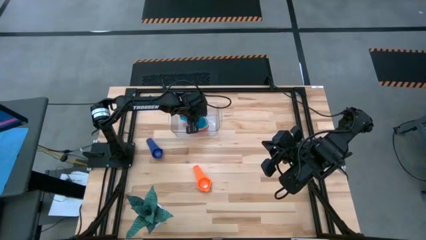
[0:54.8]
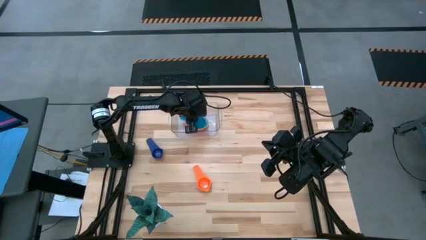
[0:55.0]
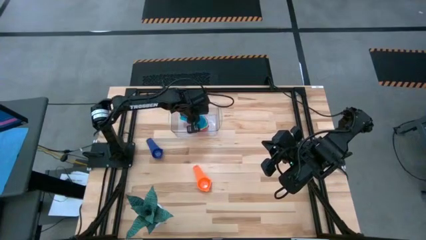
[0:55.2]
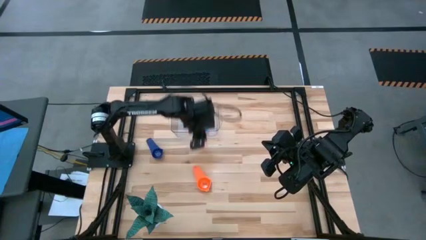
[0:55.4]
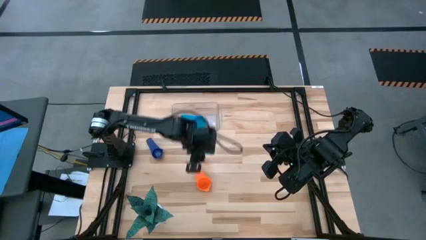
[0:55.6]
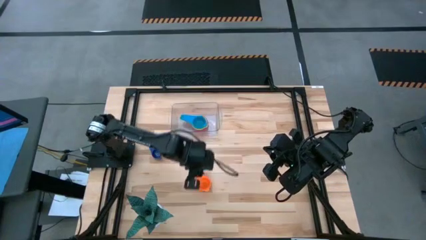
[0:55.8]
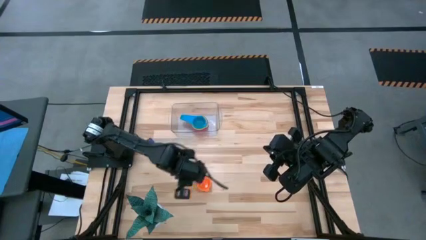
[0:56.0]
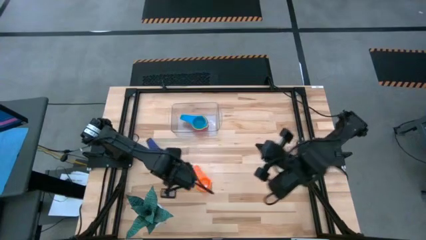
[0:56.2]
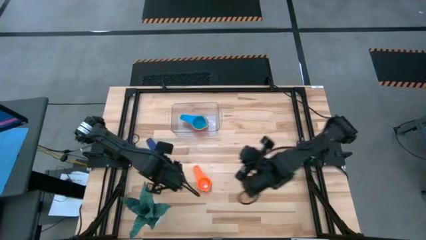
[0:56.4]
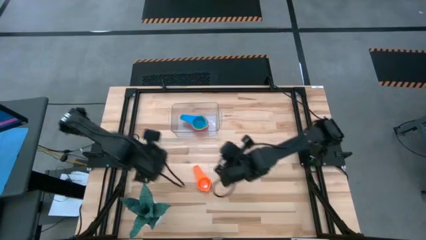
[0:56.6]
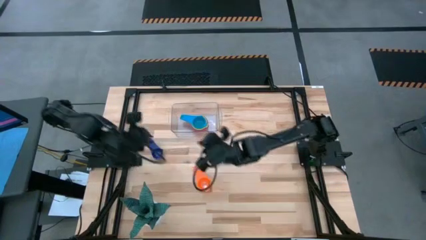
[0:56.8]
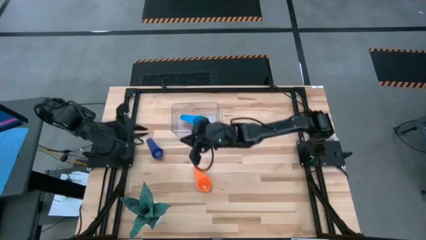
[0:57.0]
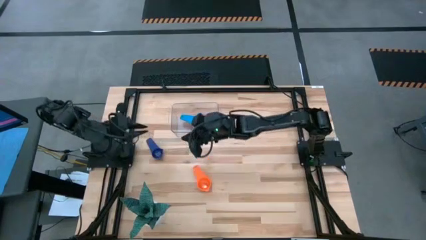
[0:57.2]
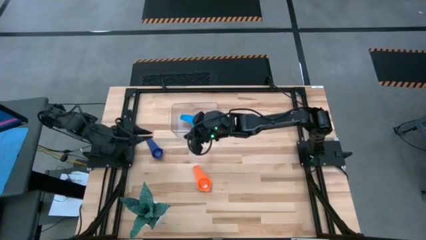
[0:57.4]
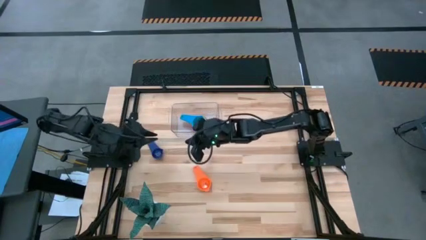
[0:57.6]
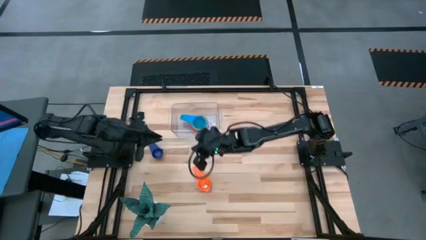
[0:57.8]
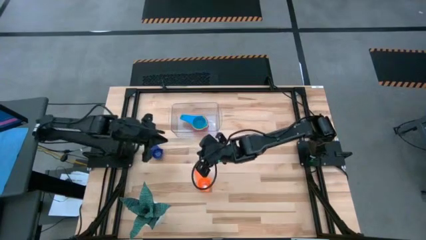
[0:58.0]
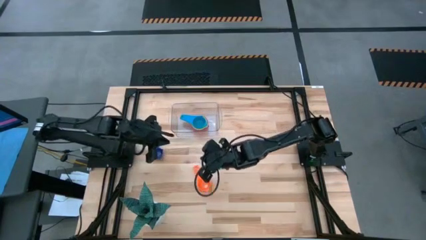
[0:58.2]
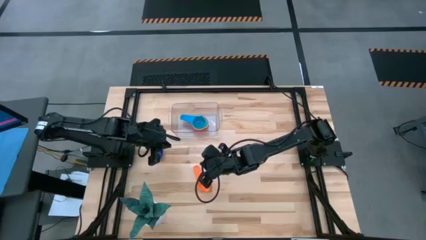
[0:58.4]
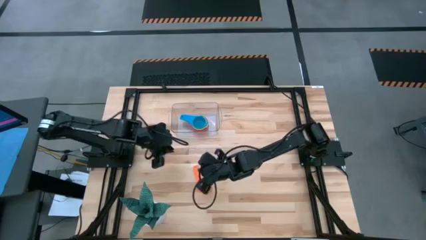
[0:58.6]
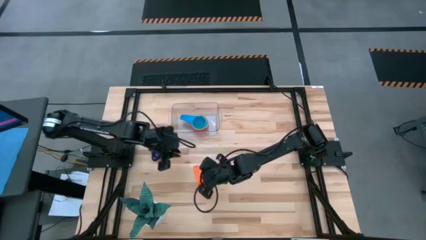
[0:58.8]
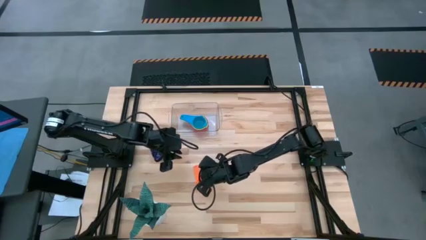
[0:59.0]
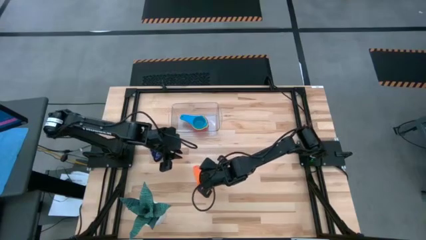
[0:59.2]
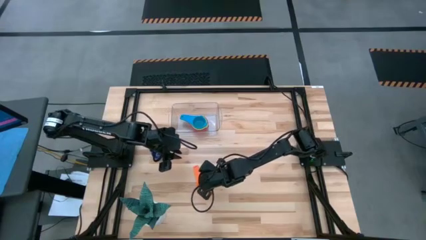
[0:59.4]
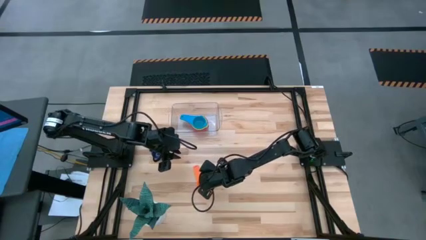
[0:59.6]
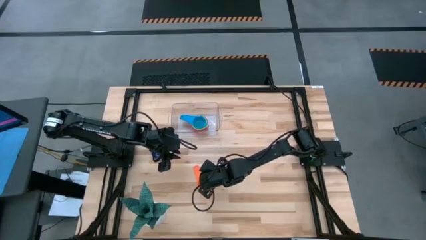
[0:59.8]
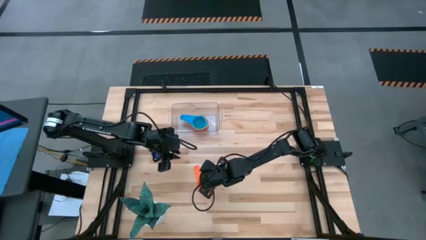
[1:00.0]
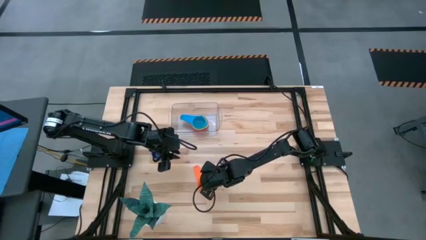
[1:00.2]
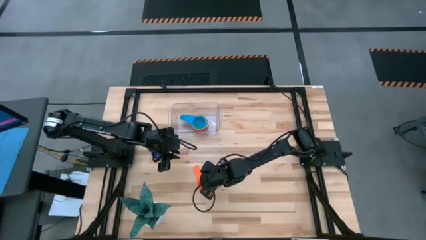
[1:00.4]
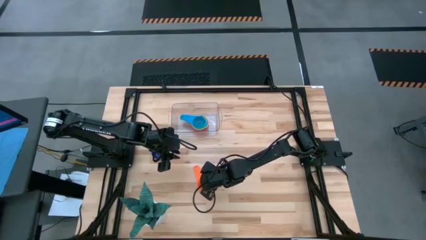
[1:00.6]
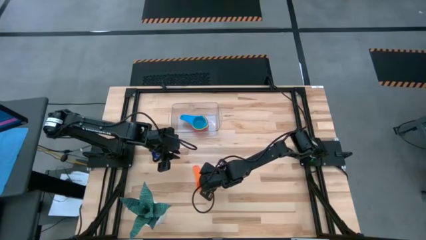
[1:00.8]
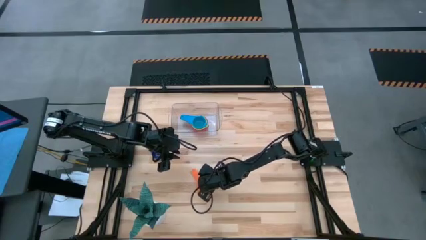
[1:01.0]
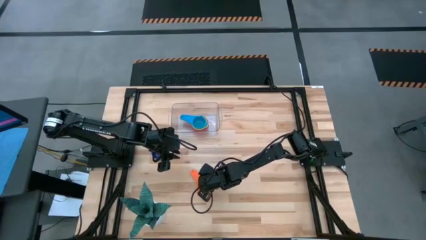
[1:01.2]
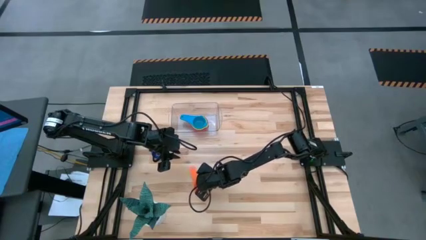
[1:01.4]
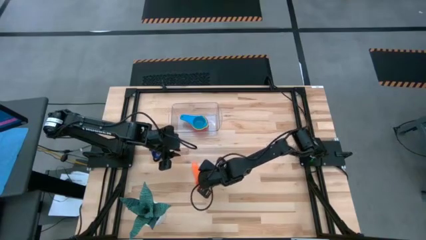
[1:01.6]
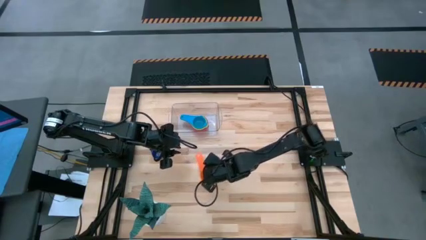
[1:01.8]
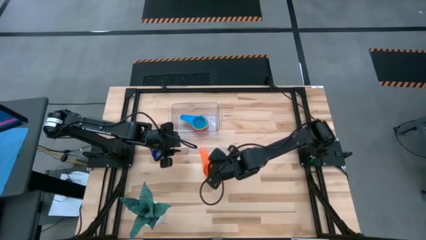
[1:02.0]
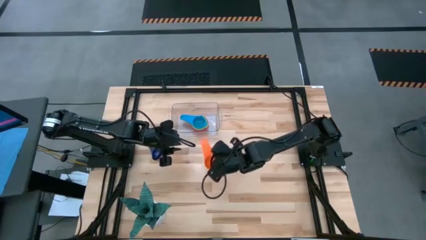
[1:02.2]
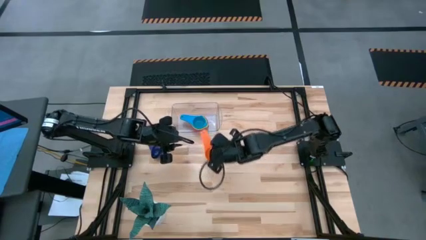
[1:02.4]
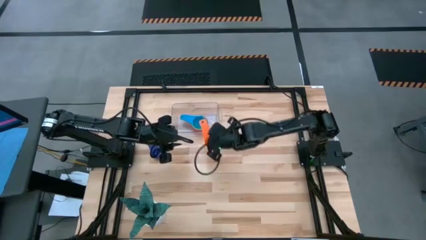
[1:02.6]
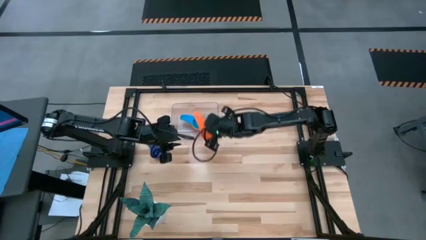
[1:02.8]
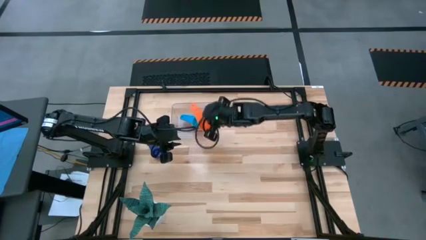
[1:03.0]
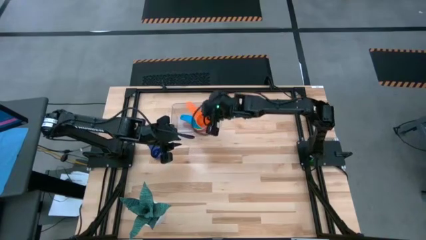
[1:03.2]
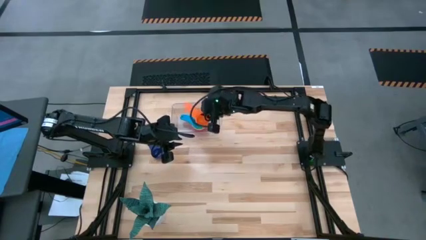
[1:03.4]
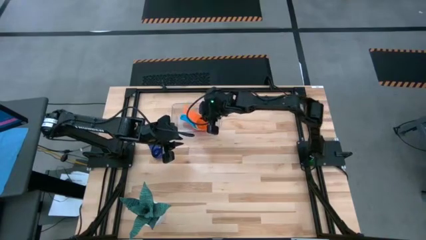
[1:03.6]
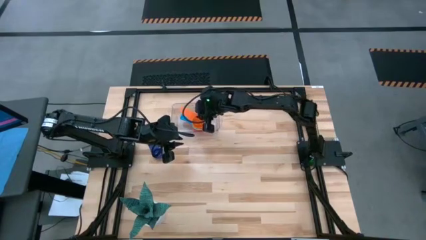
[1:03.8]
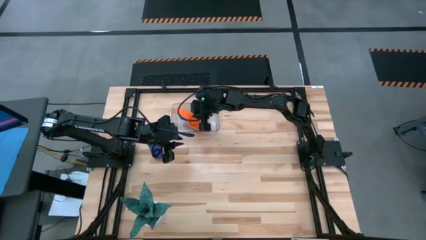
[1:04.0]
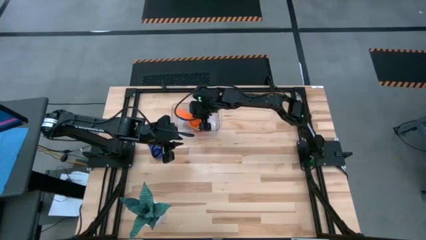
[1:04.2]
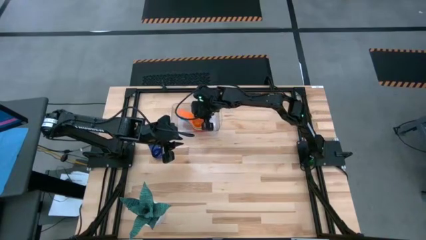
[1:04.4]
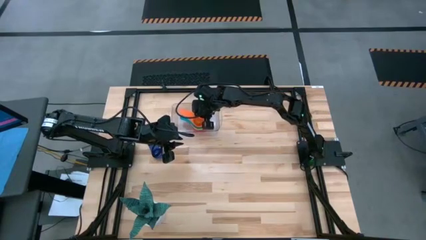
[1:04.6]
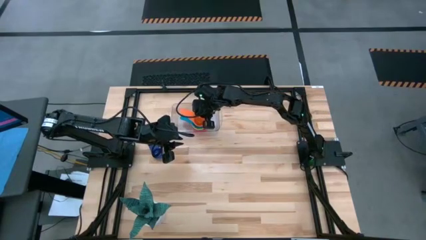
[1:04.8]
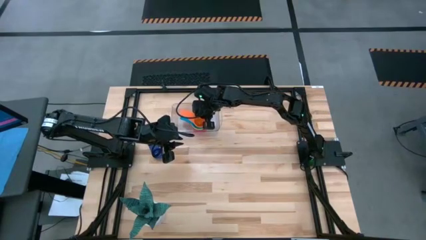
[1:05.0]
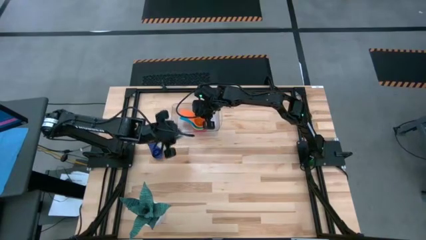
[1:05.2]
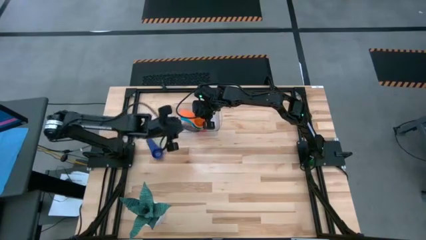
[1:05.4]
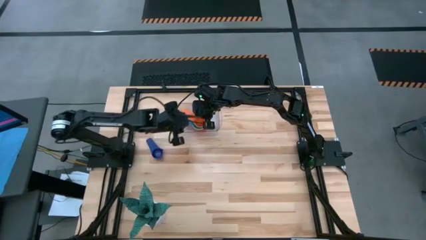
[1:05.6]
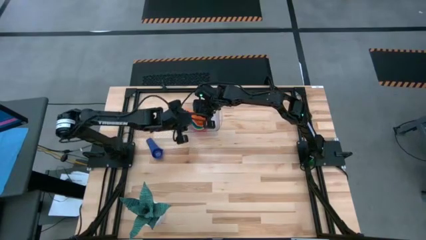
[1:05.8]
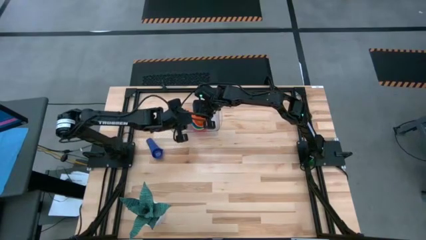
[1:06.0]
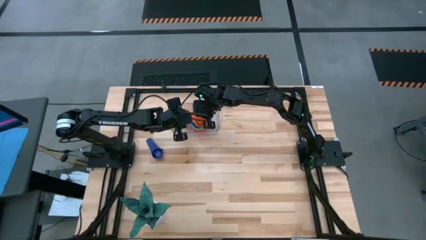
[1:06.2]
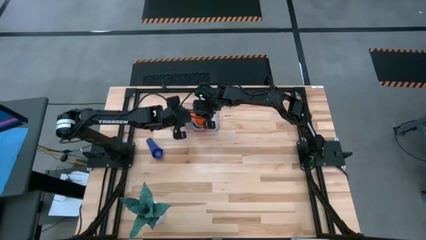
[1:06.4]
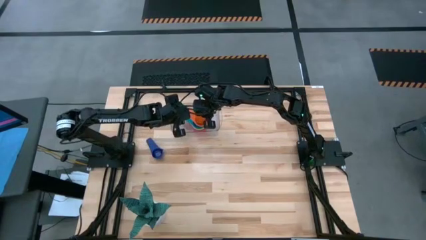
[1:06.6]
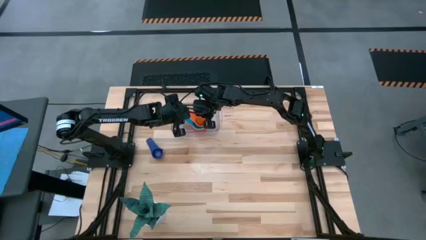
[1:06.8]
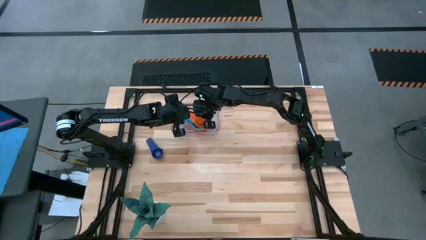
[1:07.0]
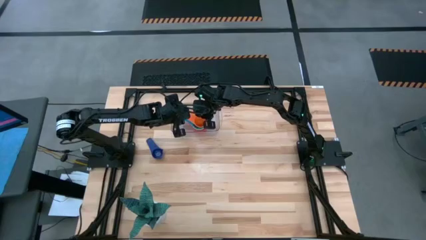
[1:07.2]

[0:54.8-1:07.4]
Task: Nest measuring cups in basket
Stack the orange measuring cup on top of the light blue measuring cup into the transparent bin

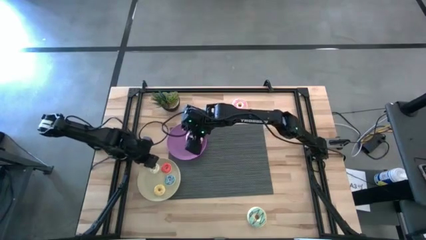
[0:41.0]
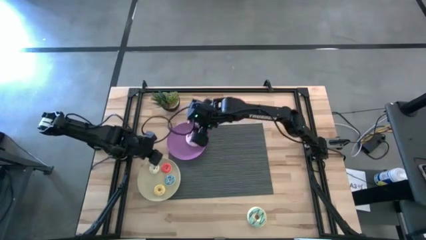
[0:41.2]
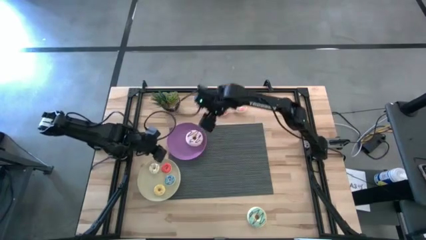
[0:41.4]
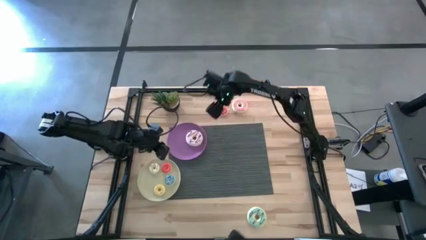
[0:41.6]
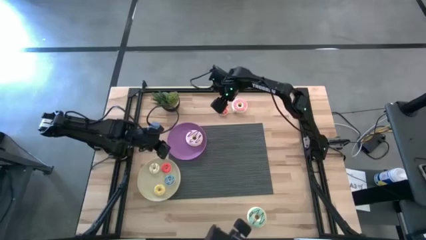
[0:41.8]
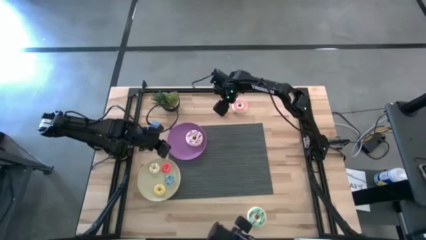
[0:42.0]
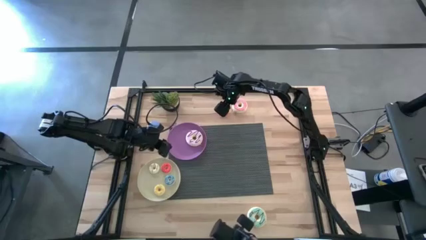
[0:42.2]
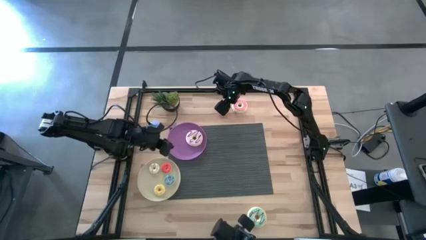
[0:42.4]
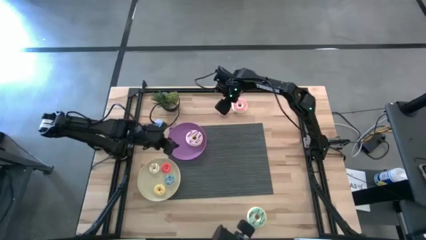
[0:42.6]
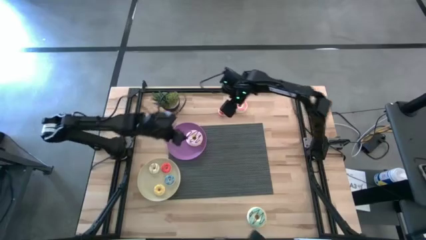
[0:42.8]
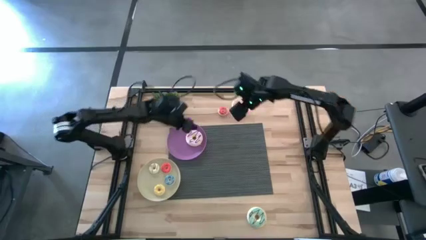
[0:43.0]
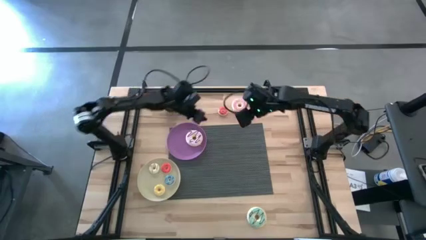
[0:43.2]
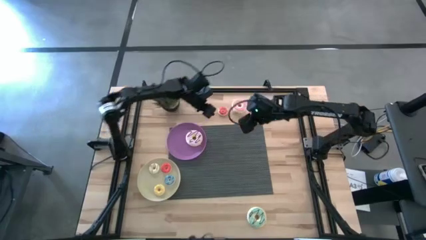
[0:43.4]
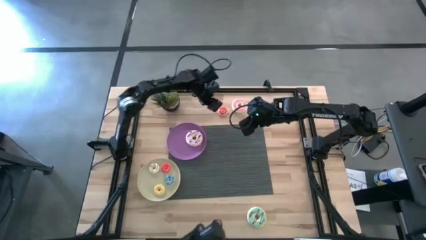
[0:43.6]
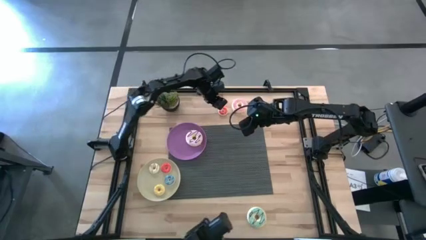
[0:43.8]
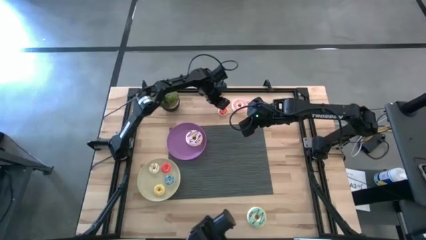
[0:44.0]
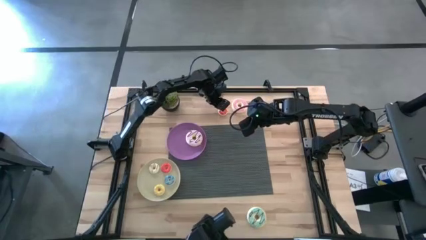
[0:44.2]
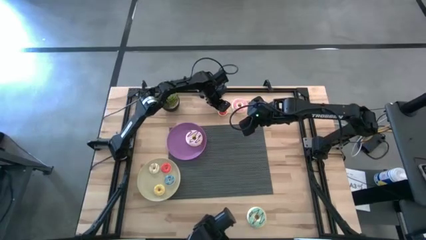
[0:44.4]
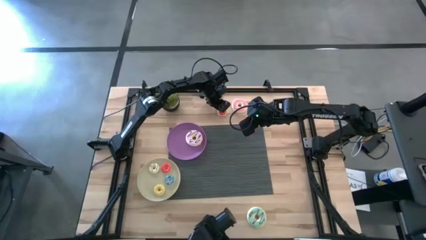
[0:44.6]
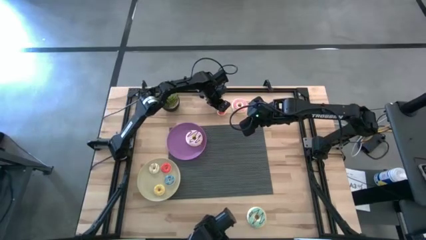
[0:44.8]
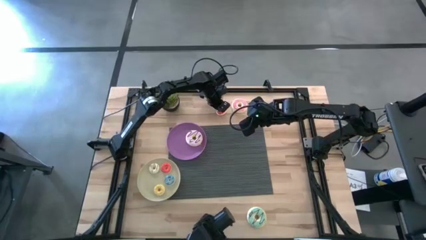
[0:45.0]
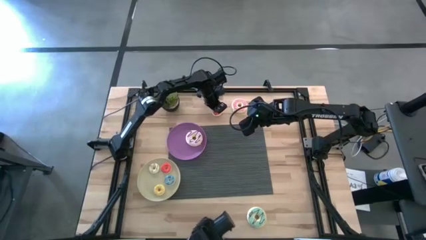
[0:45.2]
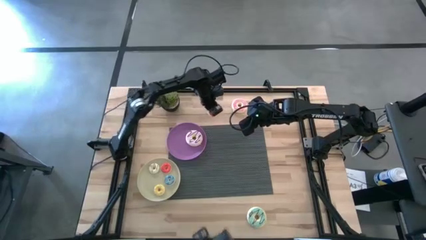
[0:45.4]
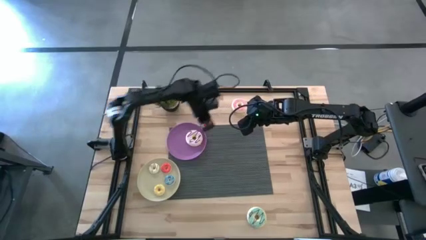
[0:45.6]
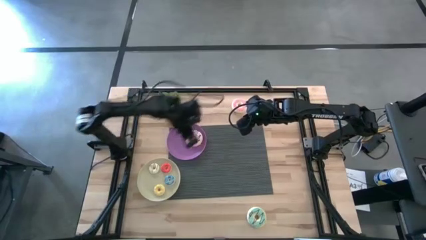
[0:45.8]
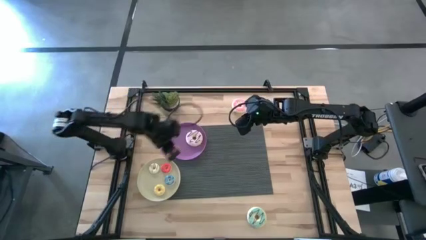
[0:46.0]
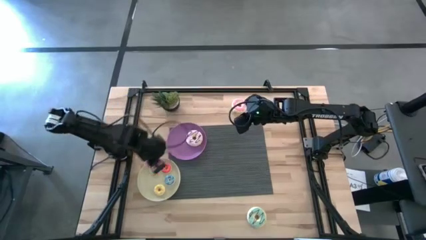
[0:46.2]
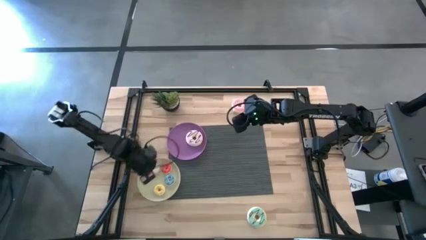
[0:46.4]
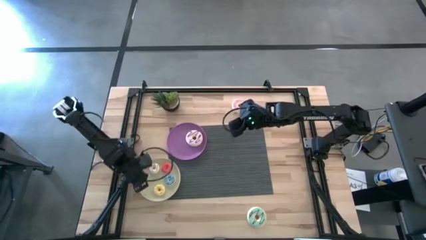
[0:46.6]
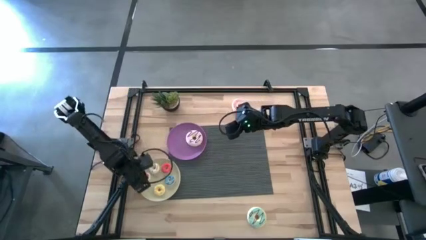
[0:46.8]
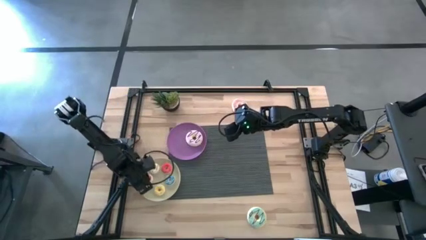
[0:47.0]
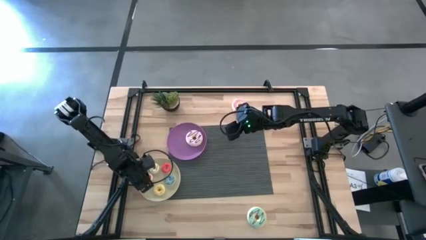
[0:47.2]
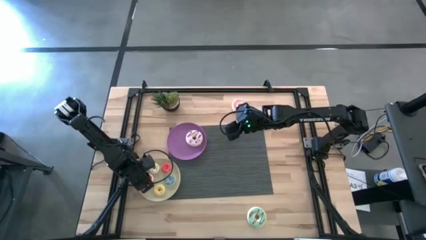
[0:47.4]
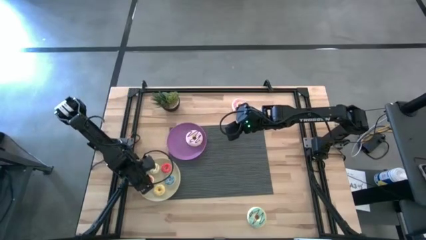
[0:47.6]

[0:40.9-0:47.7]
Task: Pick & Place donuts
Put the small red donut on the gray plate
